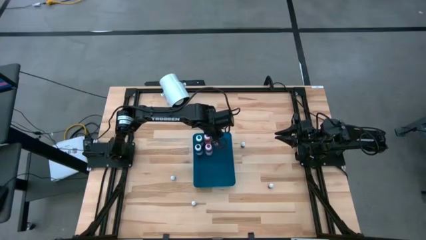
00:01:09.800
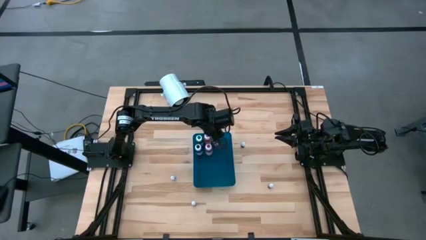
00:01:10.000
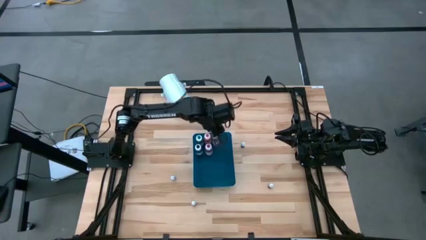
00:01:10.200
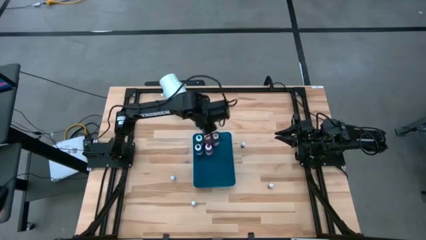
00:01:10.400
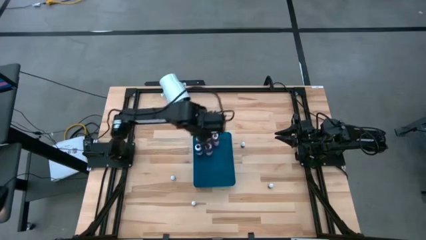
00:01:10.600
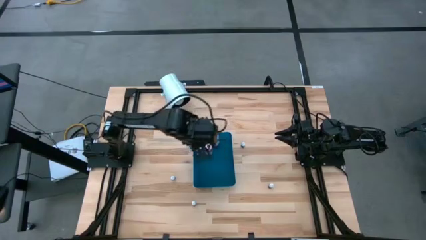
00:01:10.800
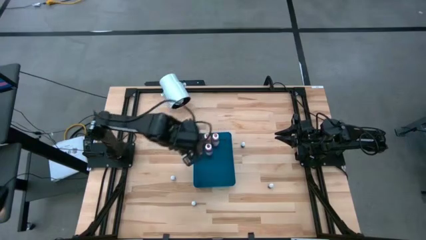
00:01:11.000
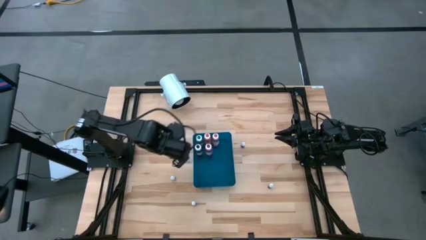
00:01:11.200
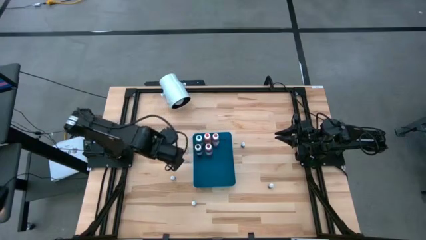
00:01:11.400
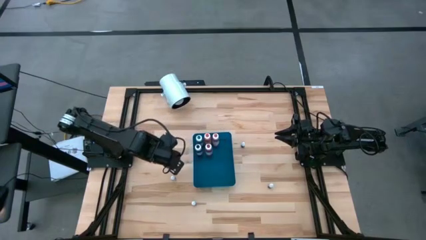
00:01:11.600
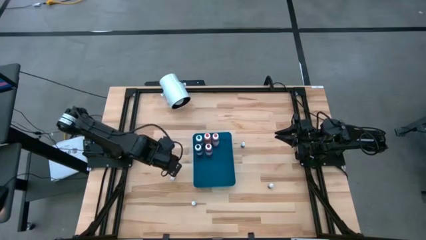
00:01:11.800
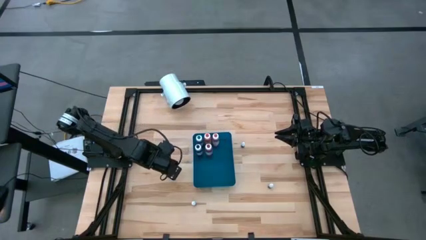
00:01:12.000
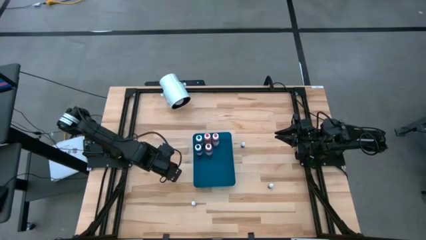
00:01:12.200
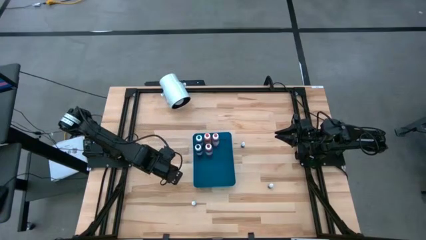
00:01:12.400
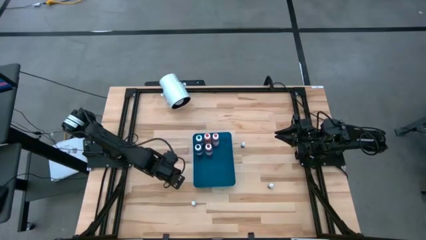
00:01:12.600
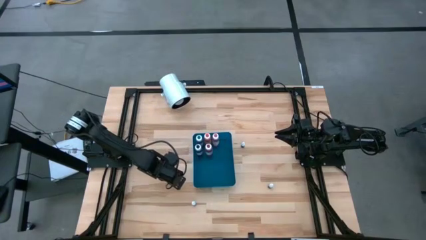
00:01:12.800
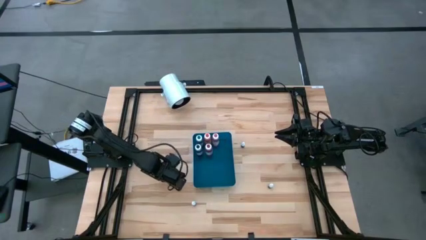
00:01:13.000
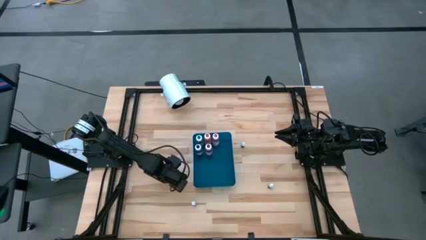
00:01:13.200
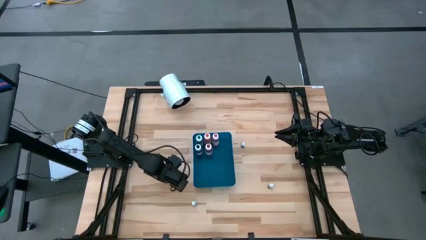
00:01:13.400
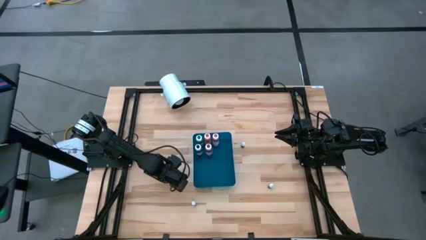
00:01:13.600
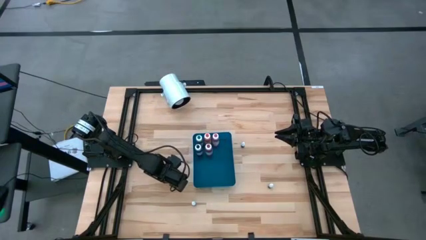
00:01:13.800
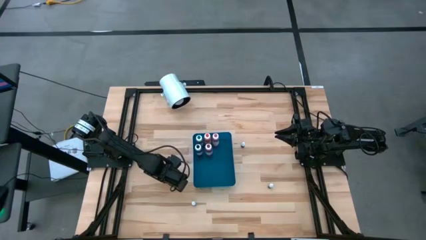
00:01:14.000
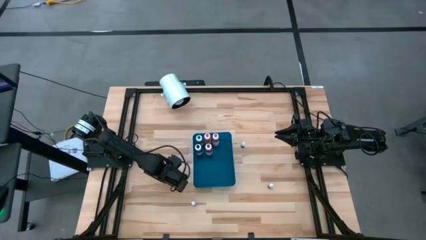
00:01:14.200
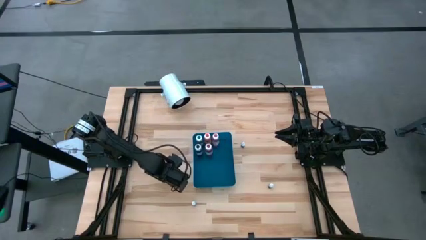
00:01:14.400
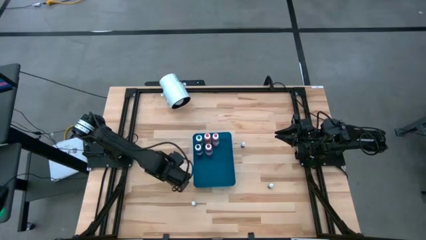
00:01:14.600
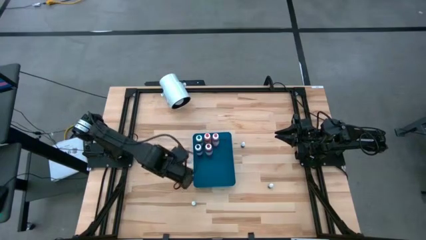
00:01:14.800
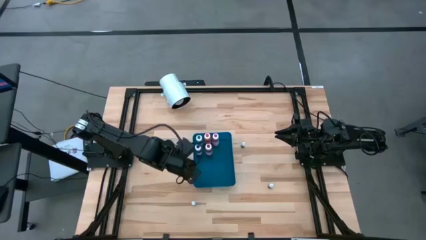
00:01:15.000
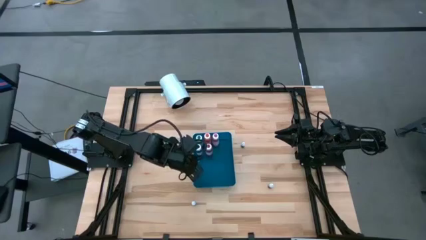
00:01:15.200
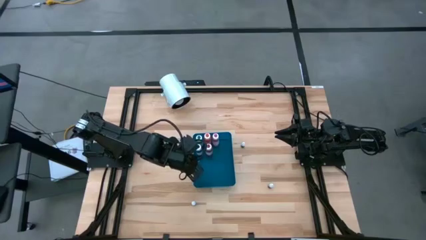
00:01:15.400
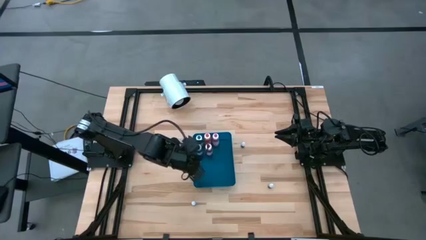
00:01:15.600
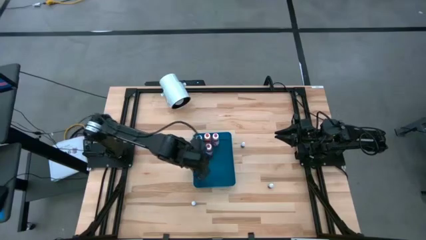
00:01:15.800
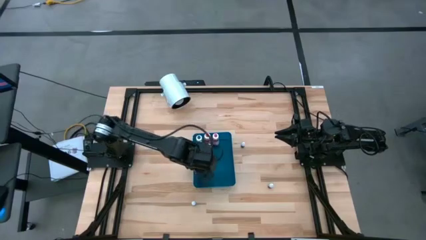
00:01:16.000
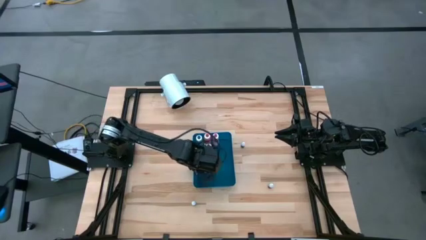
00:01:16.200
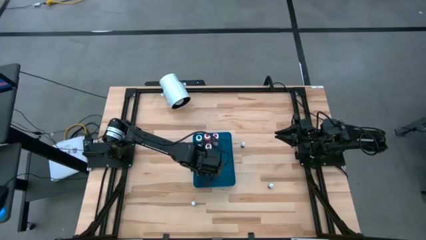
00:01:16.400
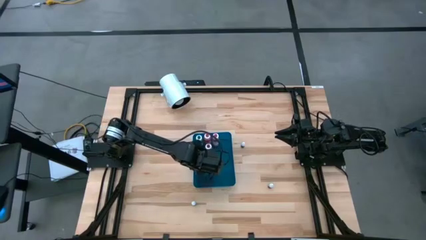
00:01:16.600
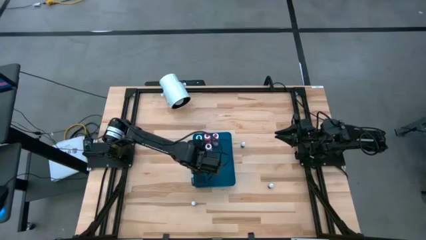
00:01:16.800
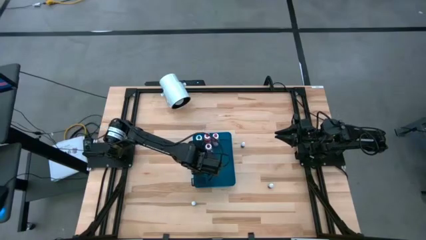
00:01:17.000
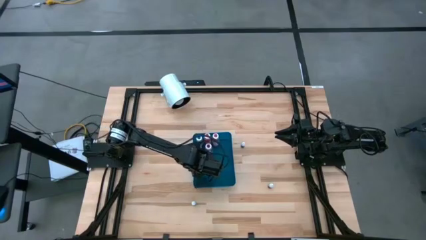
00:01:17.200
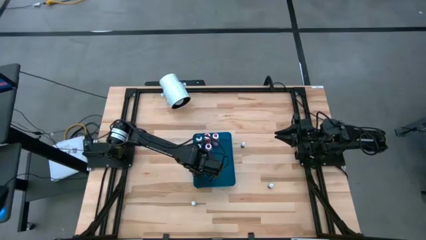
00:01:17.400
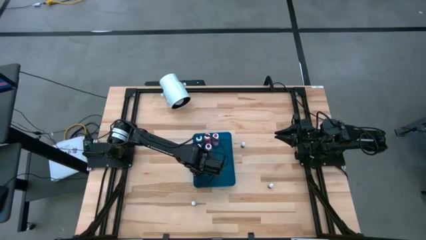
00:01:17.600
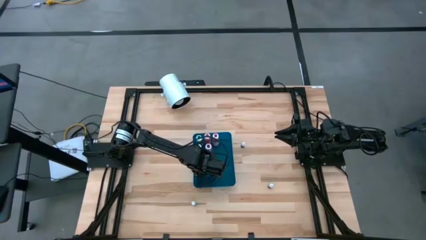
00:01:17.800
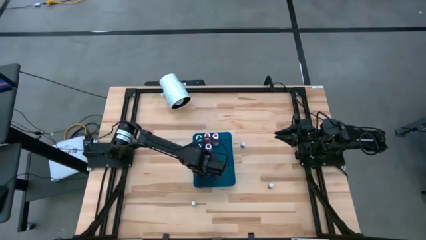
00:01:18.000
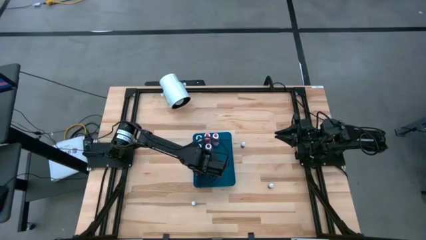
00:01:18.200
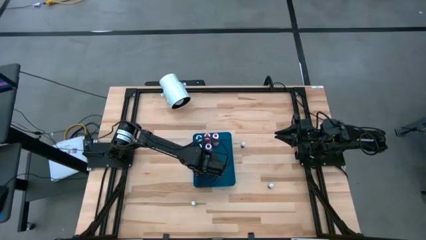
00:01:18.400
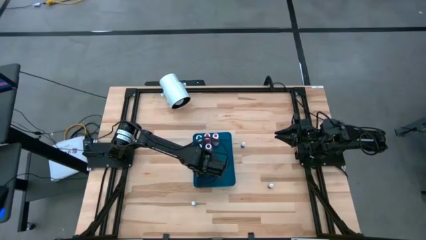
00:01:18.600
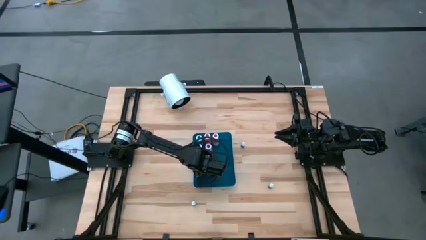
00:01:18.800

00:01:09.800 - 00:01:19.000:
Task: Pick & Place food coloring
Put the middle left small black food coloring bottle into the blue bin
